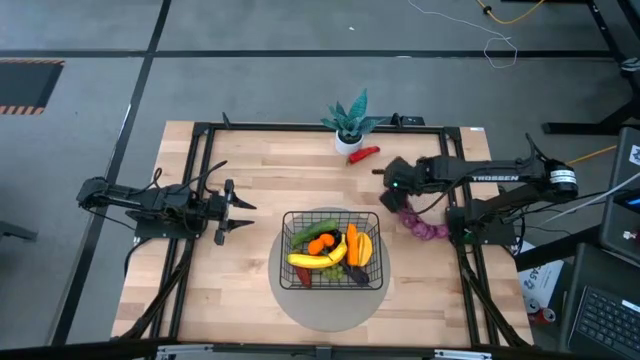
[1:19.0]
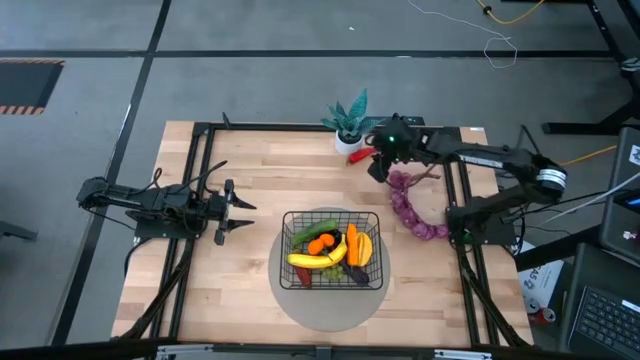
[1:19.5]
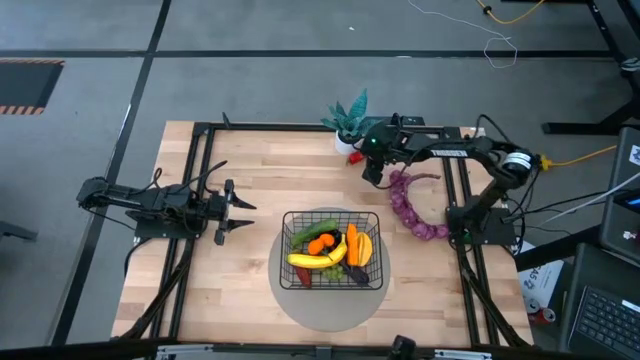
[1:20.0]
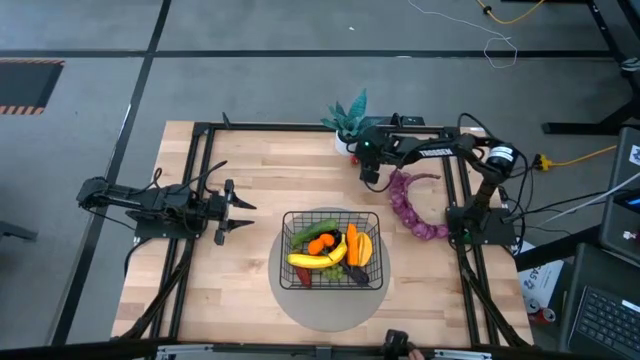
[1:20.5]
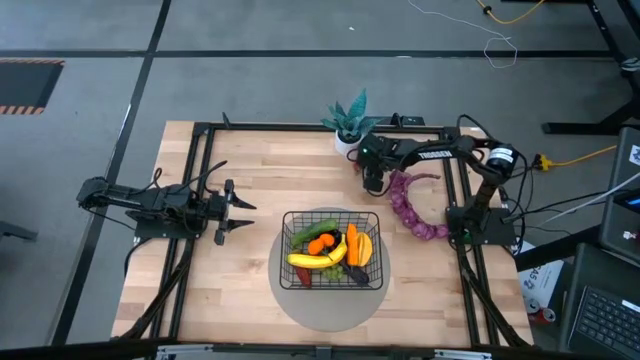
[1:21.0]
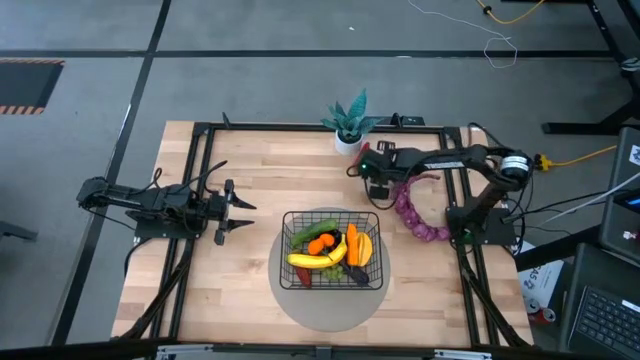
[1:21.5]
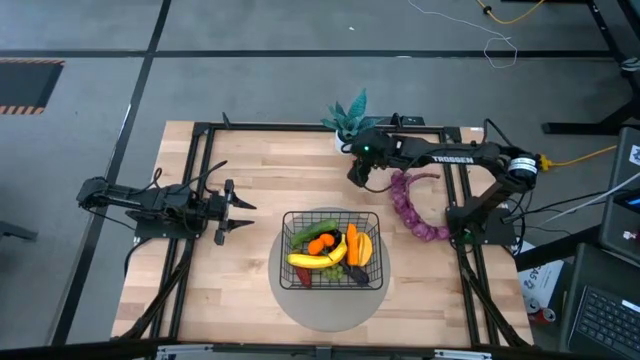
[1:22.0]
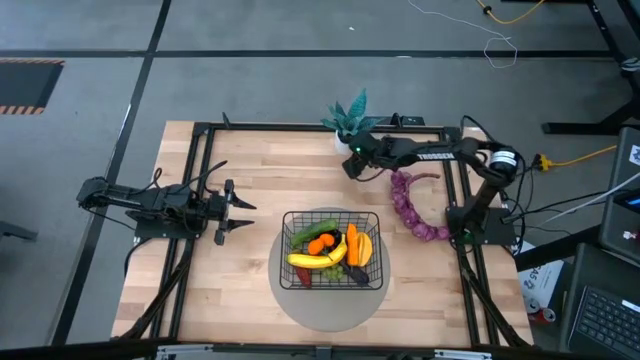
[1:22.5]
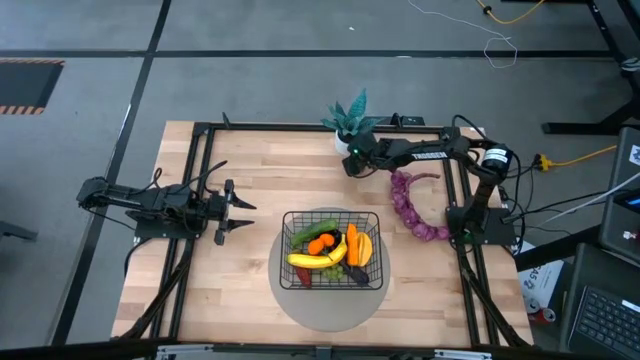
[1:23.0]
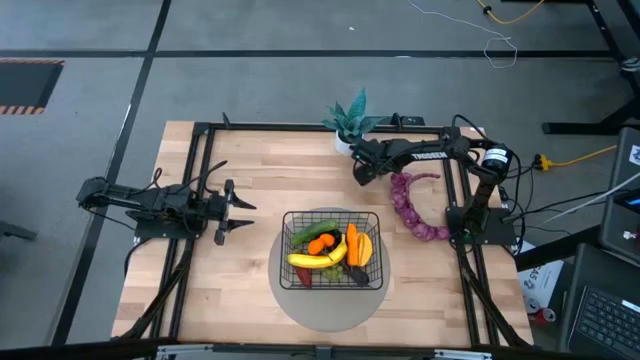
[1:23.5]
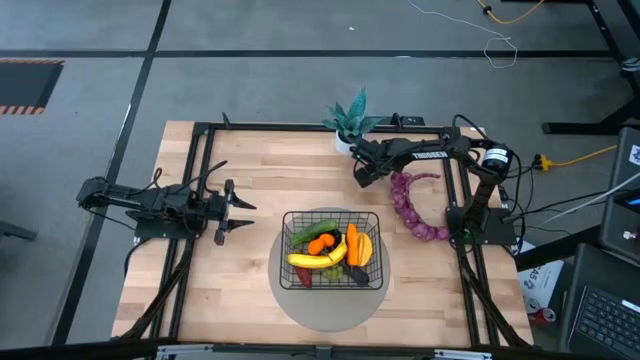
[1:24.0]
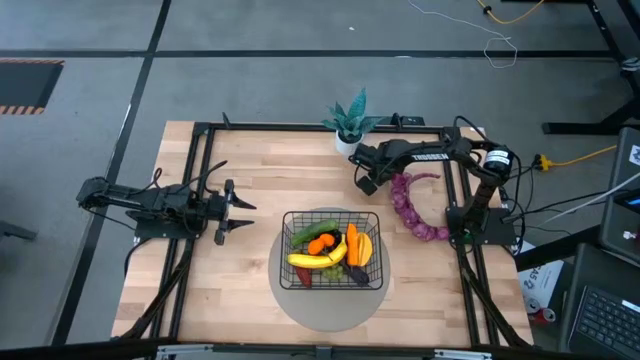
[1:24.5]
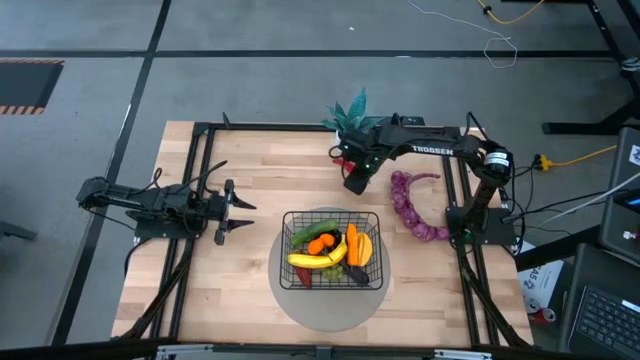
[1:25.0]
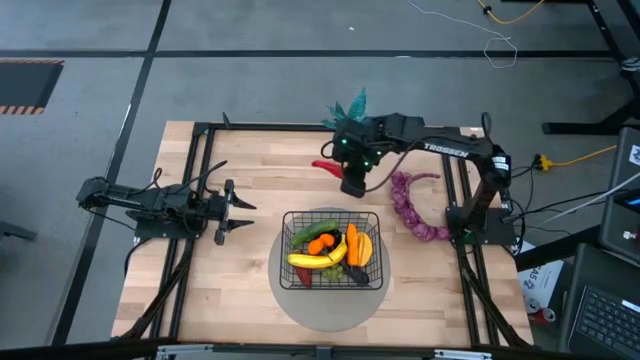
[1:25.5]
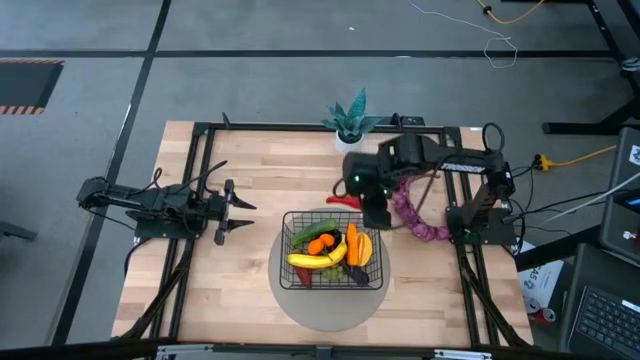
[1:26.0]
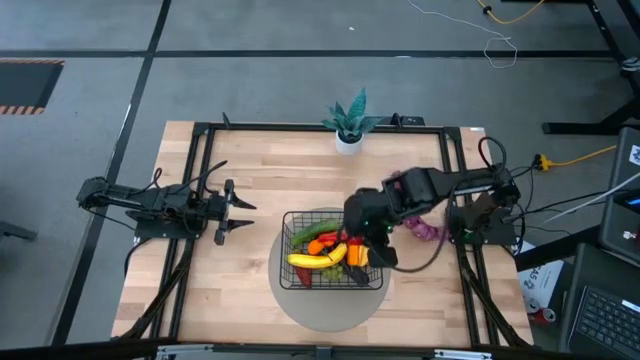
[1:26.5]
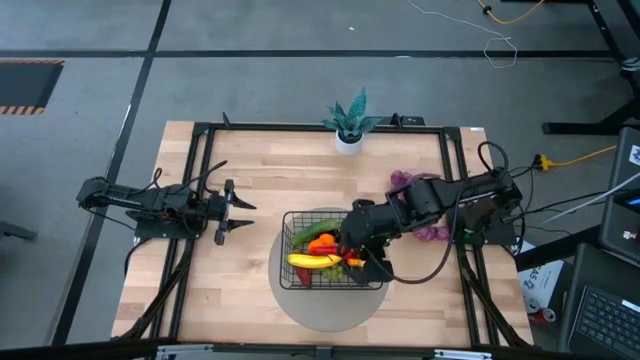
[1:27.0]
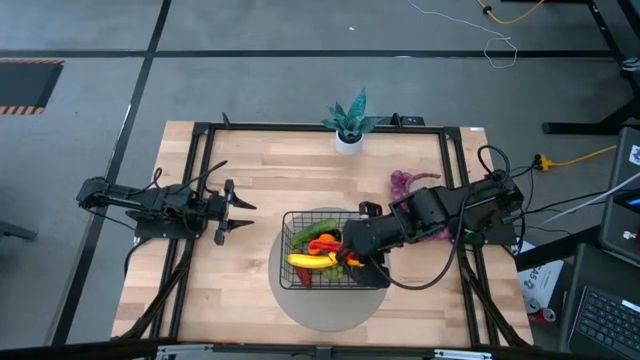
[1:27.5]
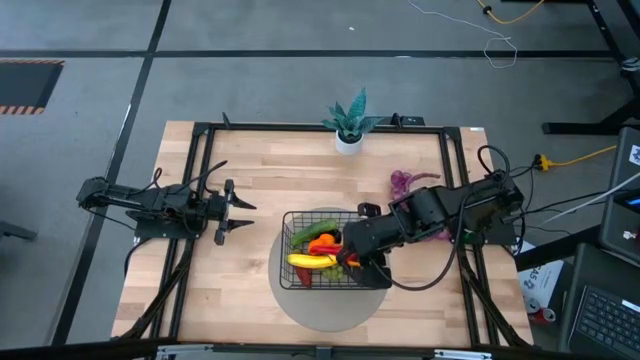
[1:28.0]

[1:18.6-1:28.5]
Task: Build produce basket
Put the red chili pepper into the black wire basket

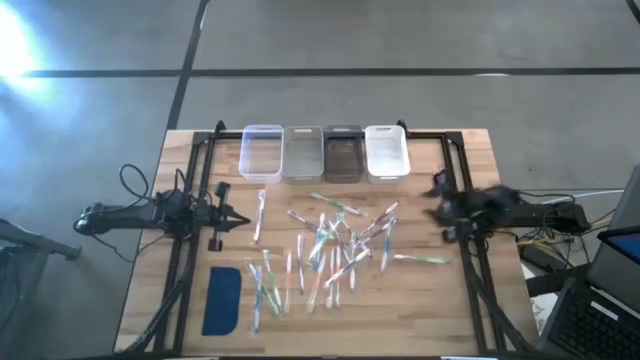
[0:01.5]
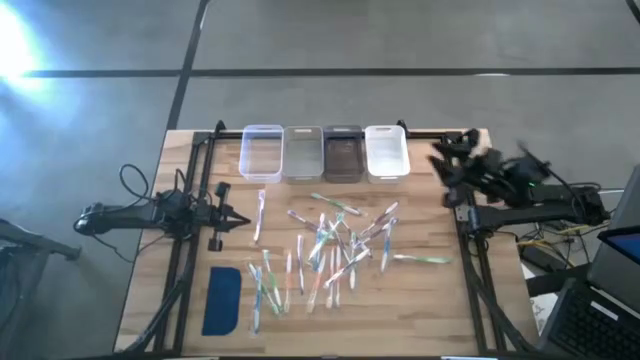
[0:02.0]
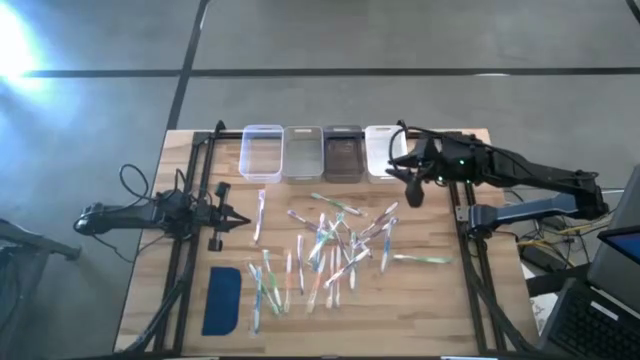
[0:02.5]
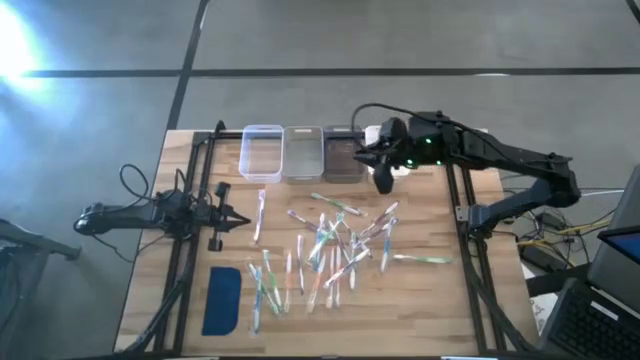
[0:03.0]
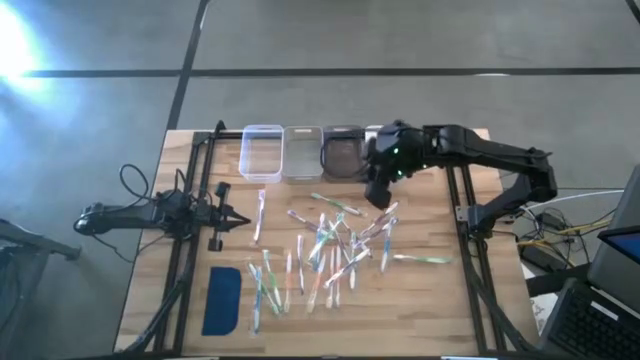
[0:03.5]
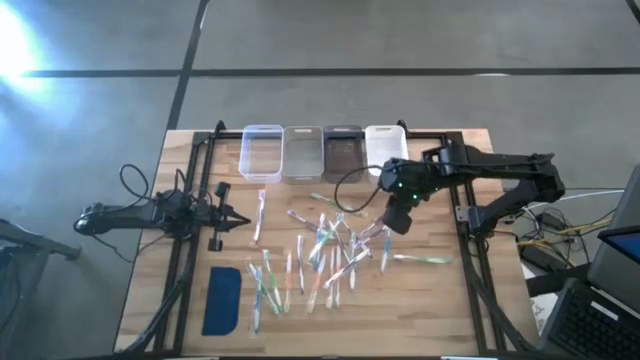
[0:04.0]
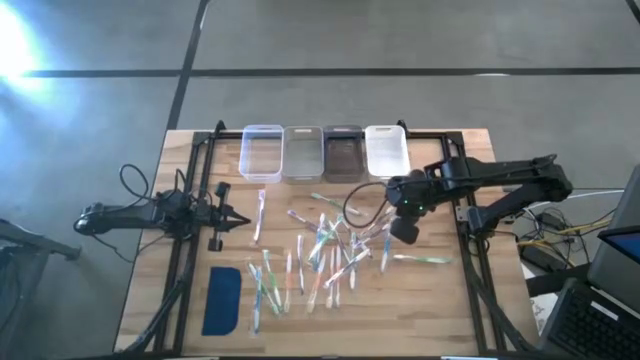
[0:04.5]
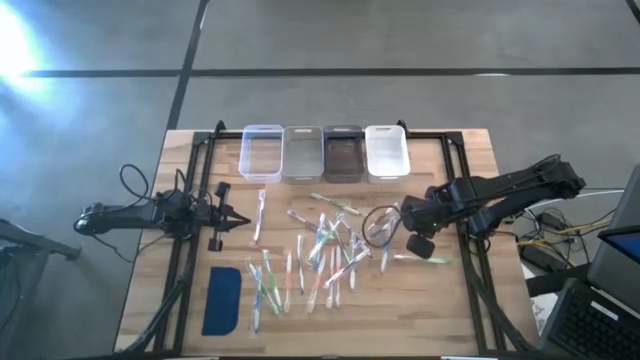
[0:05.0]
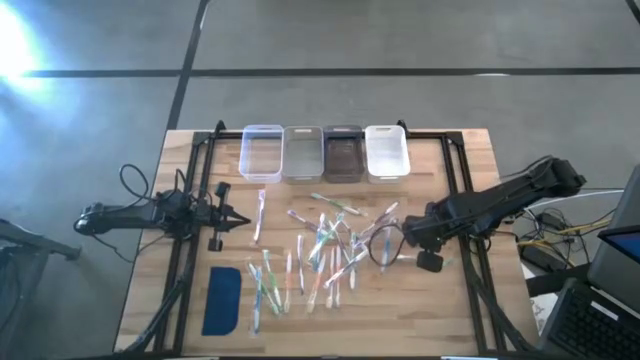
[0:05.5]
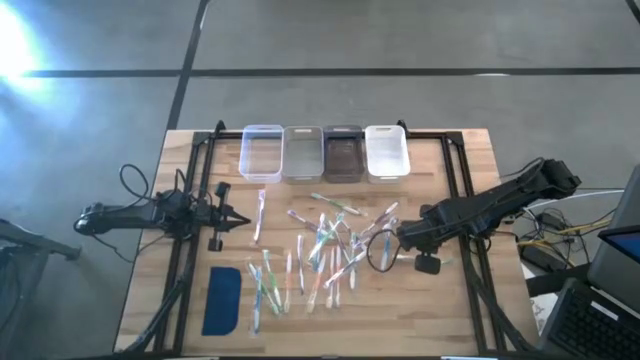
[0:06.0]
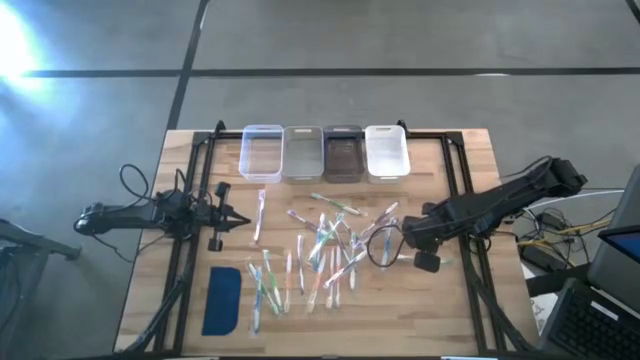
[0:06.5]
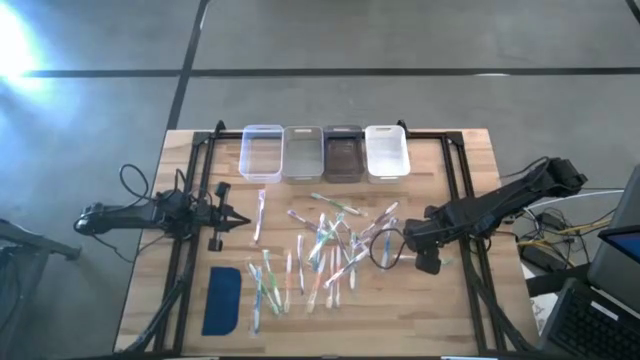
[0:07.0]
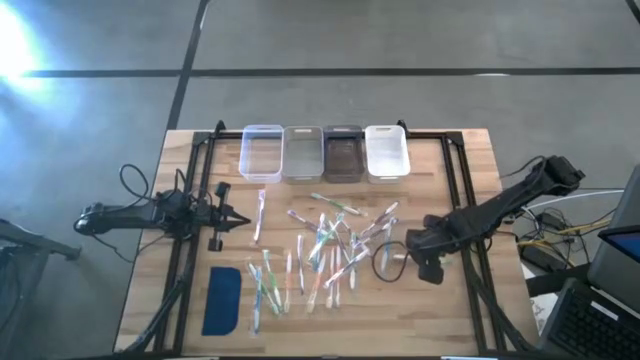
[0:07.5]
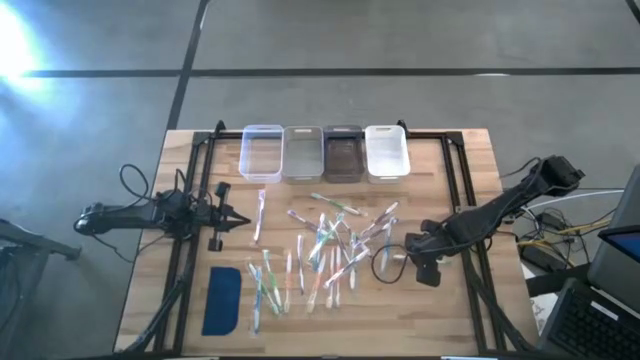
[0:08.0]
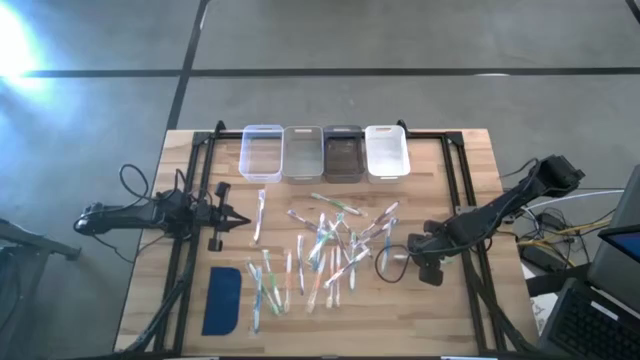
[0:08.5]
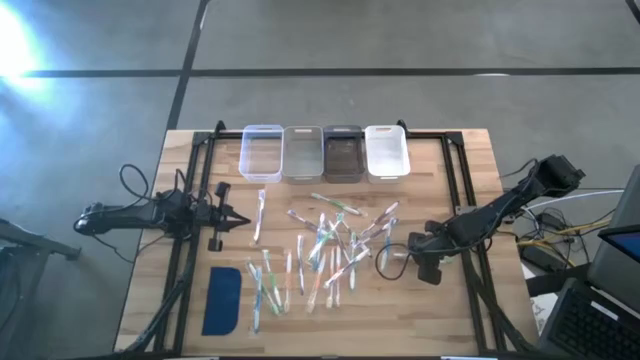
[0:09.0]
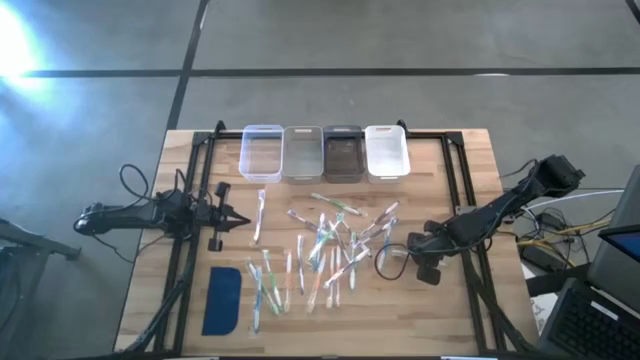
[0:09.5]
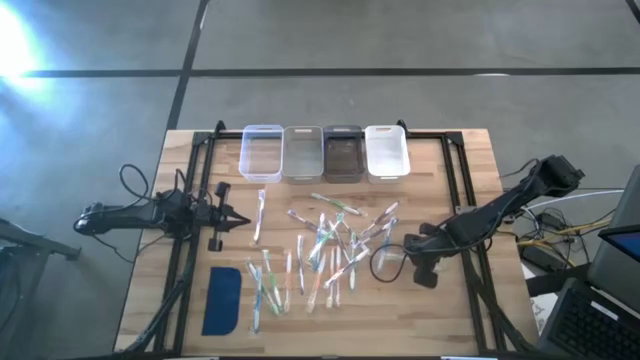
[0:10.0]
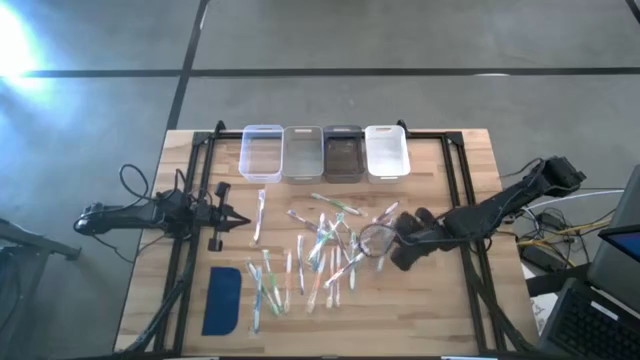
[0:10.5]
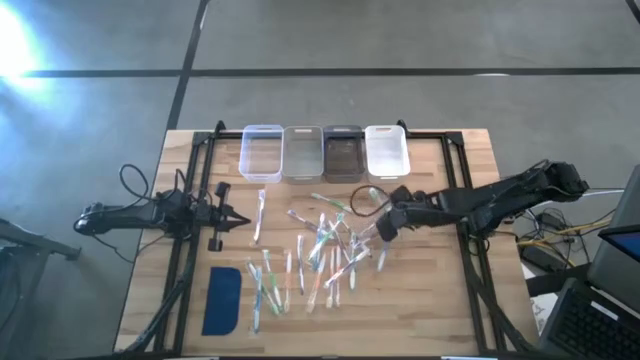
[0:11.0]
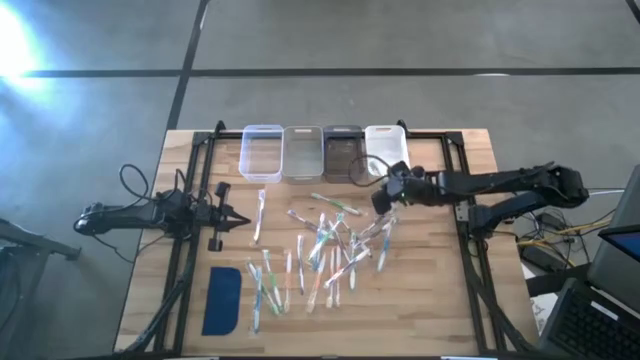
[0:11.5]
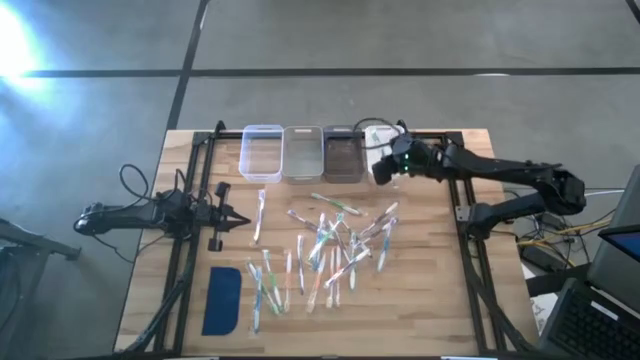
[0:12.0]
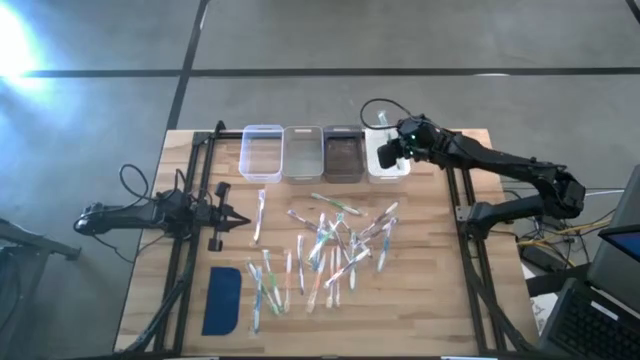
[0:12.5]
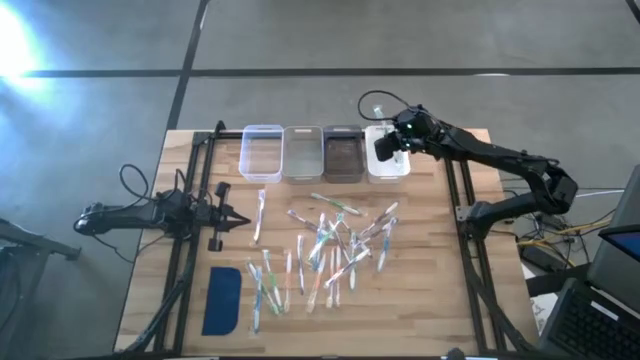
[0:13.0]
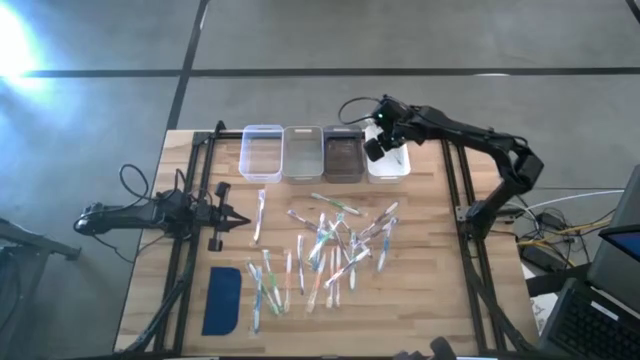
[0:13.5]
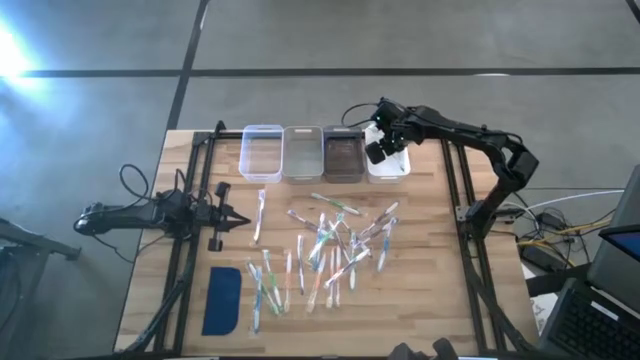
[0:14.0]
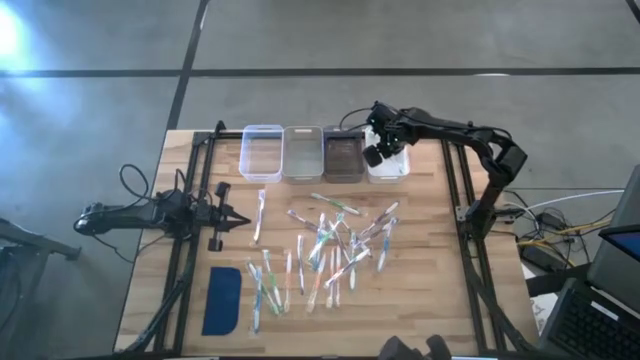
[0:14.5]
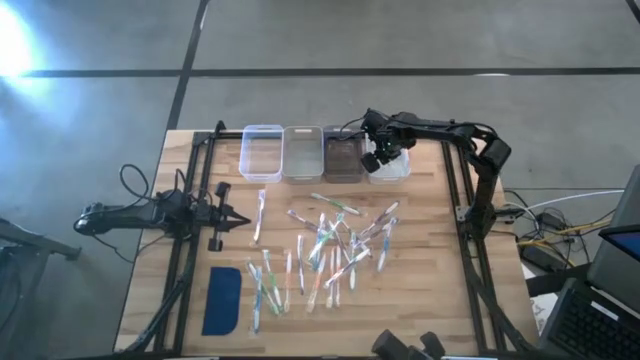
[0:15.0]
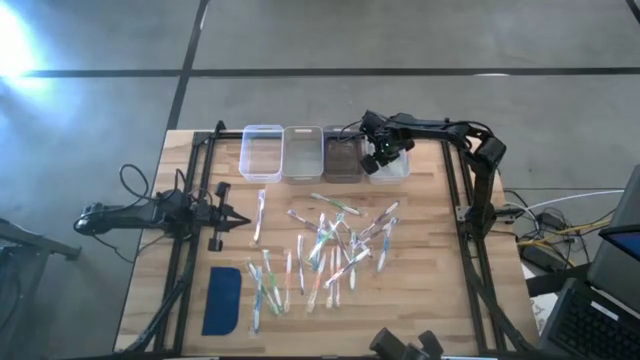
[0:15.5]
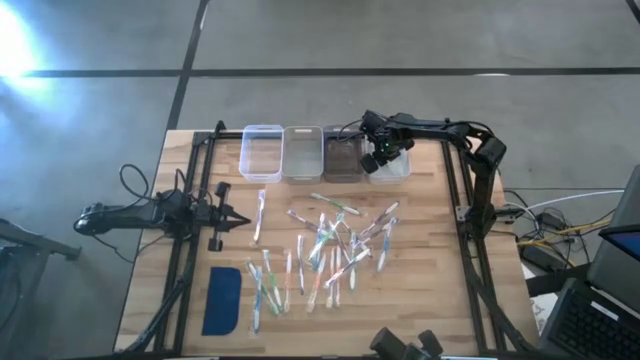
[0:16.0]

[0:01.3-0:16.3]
Task: Pick & Place Toothbrushes
Put the green toothbrush into the white bin
